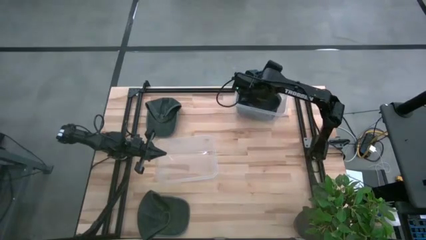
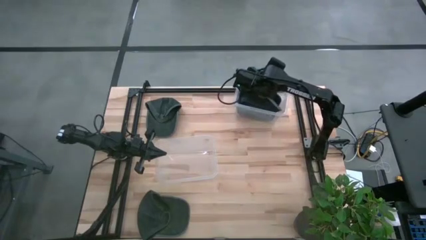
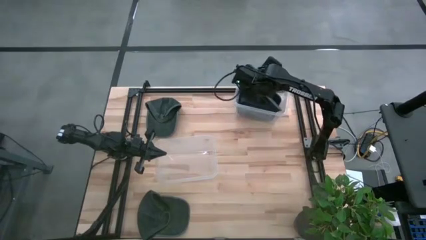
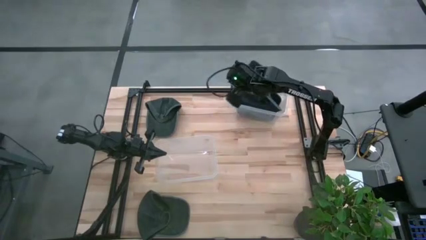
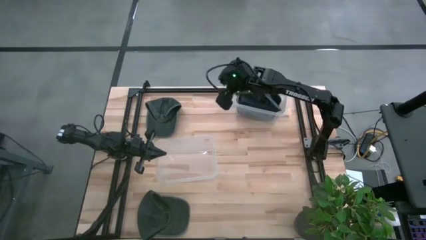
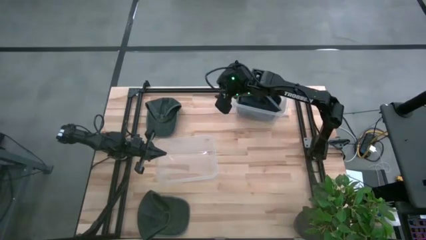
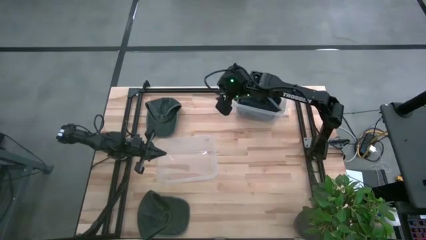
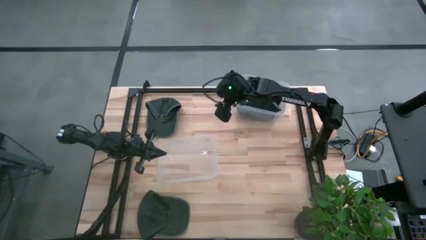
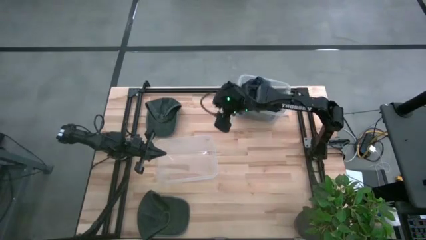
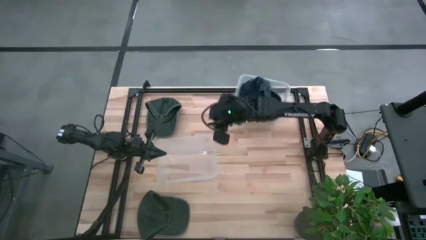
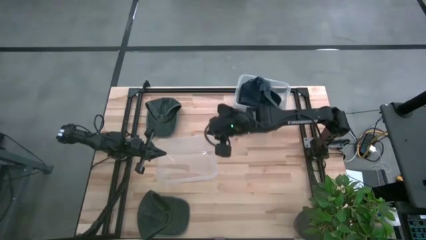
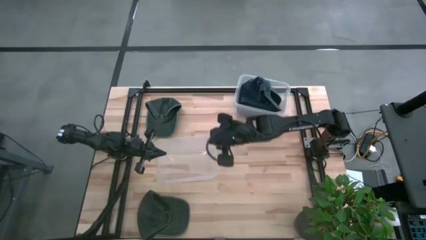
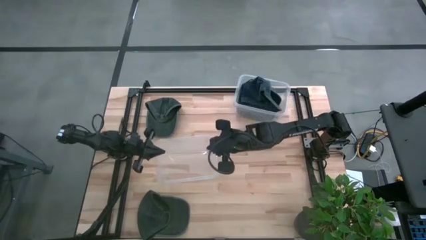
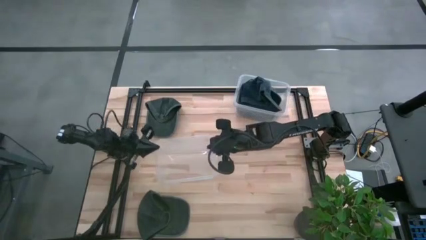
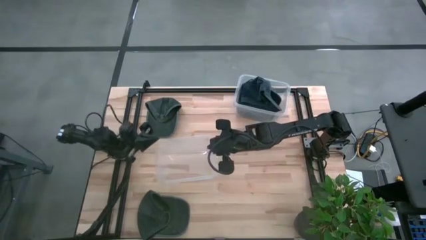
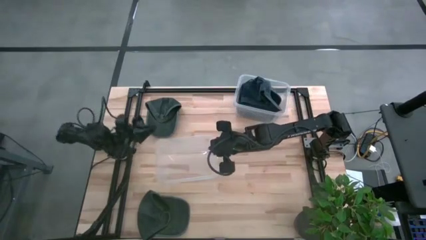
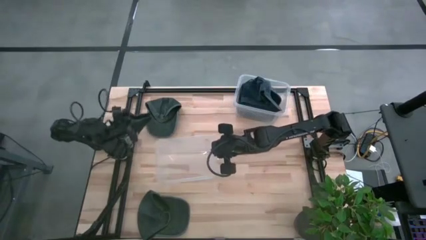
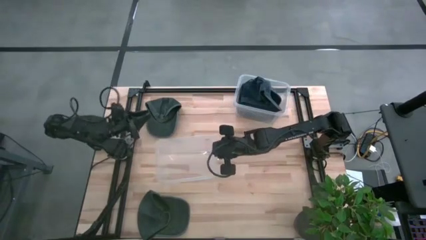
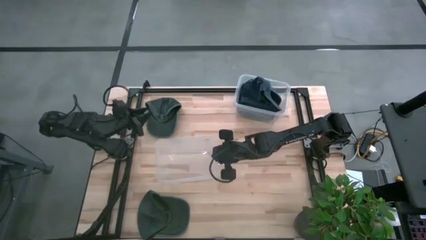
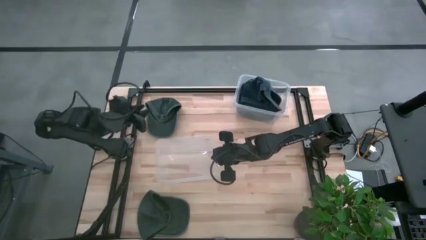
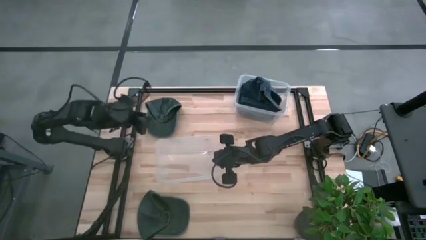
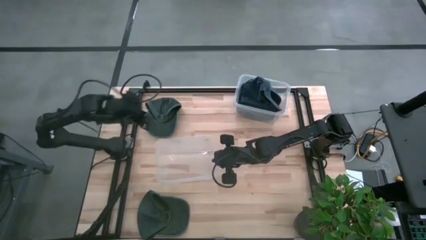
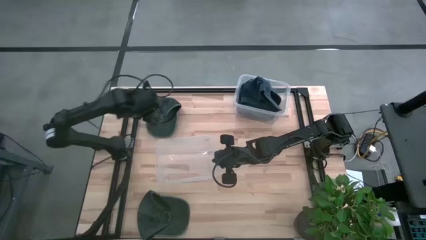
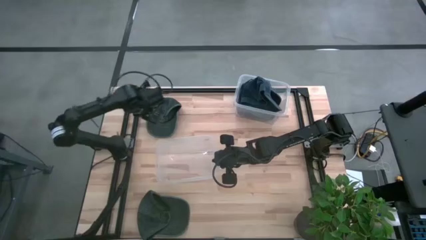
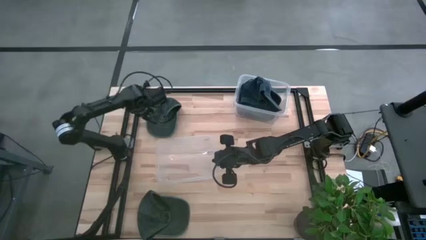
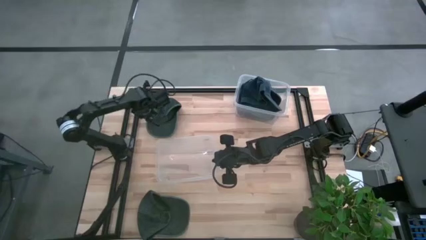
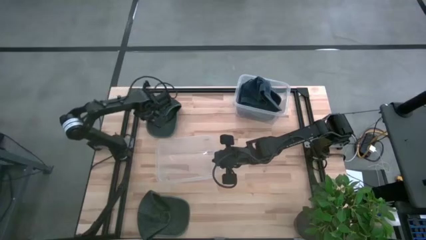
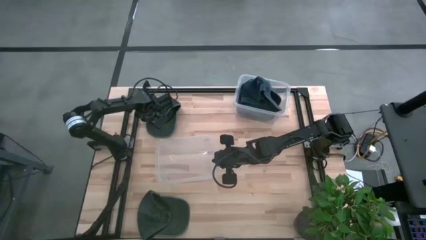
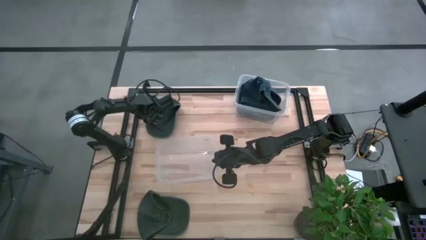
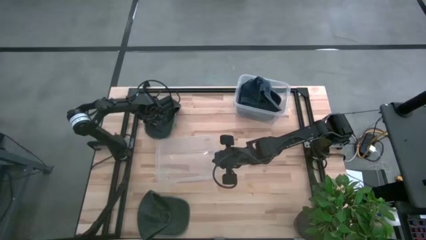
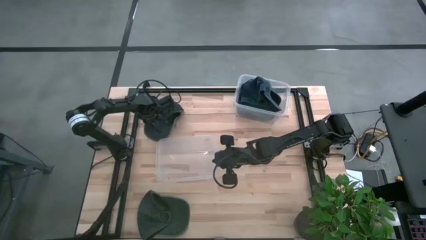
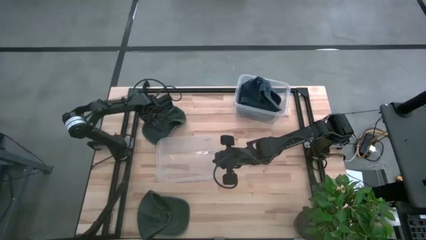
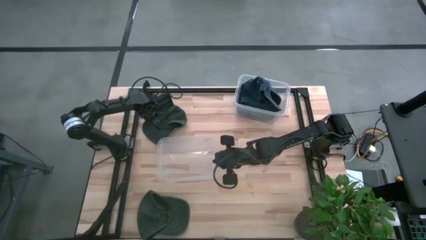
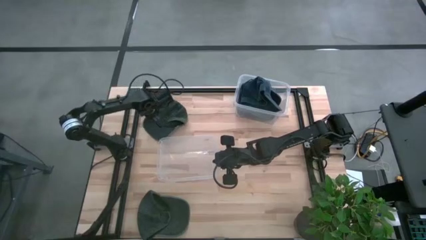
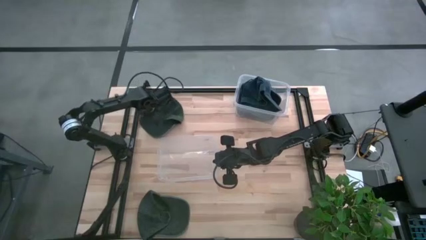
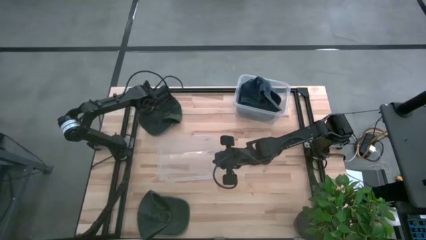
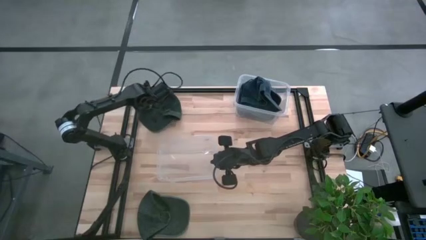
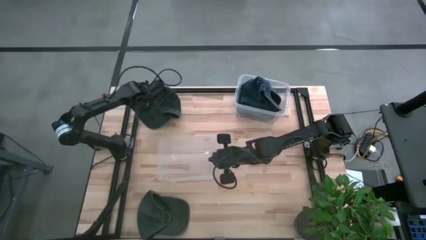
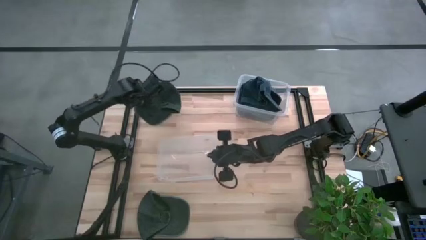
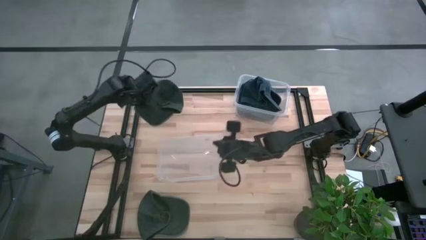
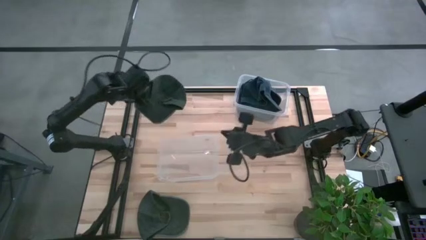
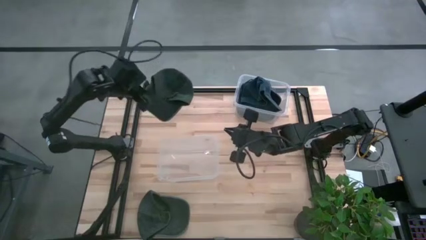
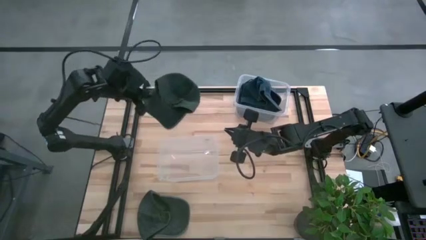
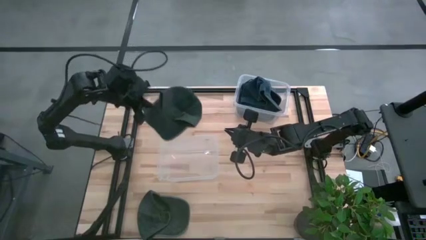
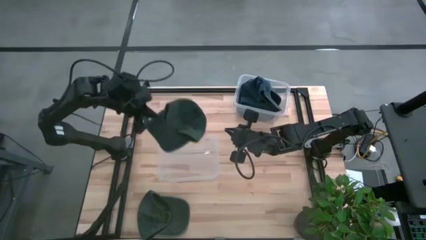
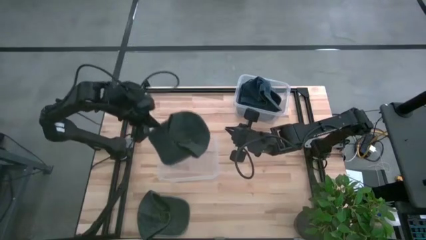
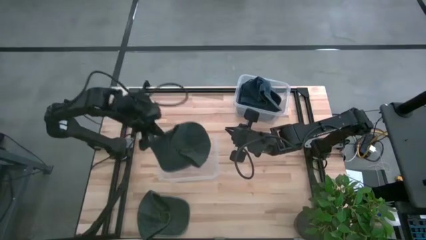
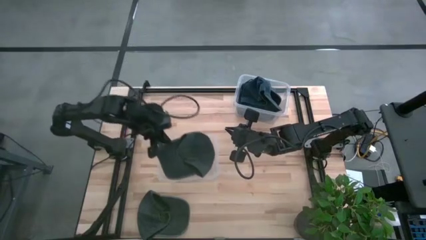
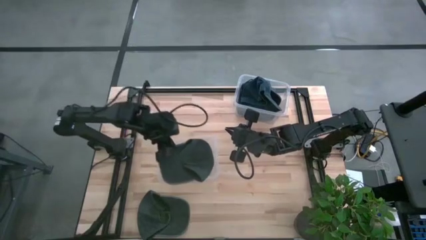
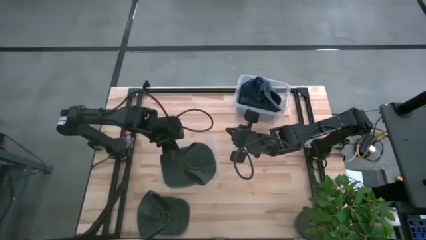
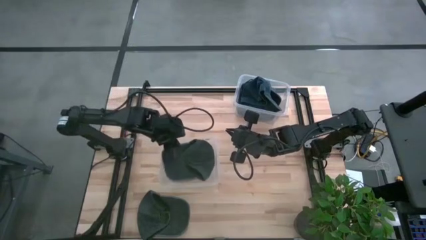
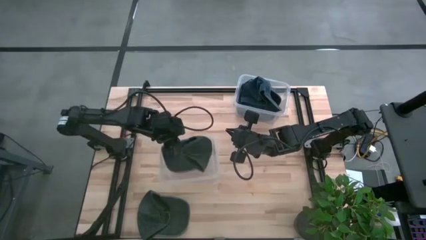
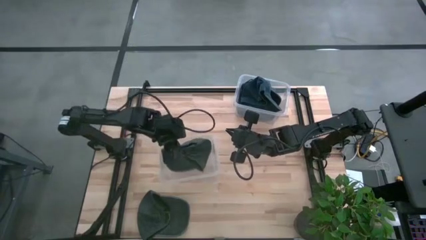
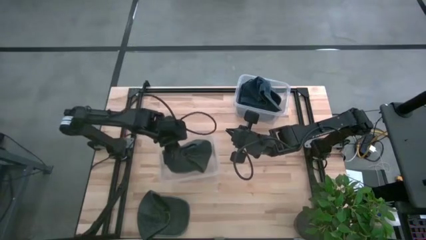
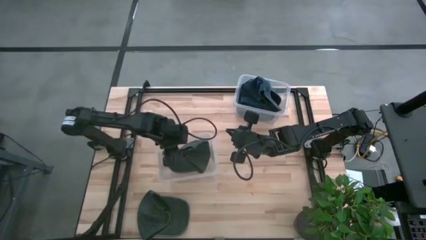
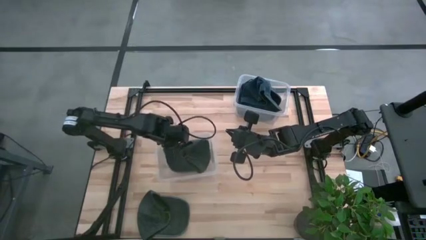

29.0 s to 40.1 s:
Task: Pick & Place hat
Put the top green cap into the bottom transparent bin
